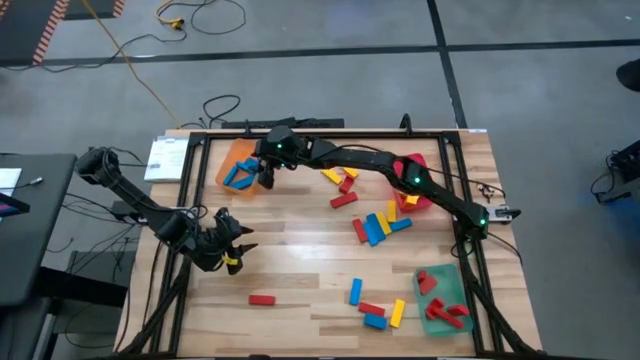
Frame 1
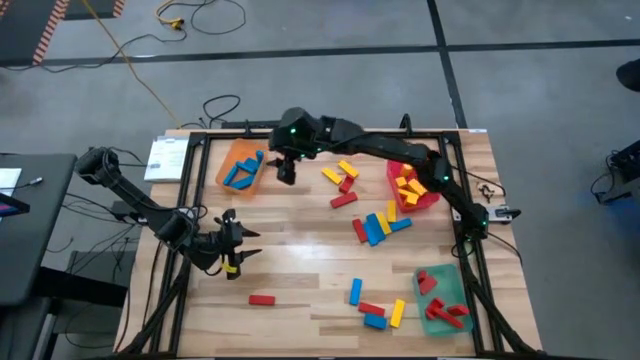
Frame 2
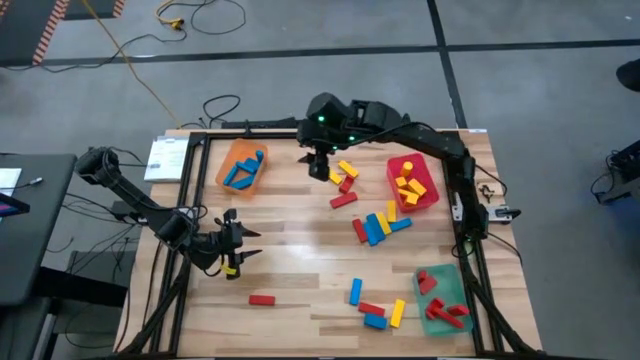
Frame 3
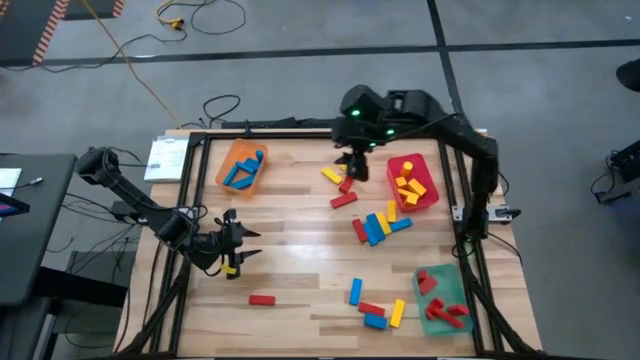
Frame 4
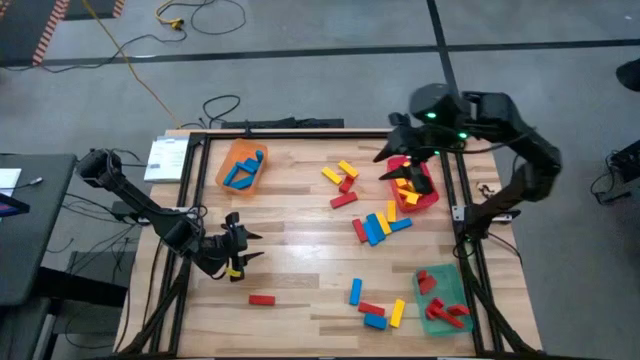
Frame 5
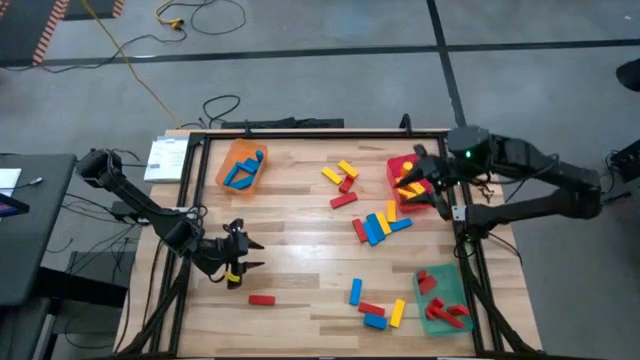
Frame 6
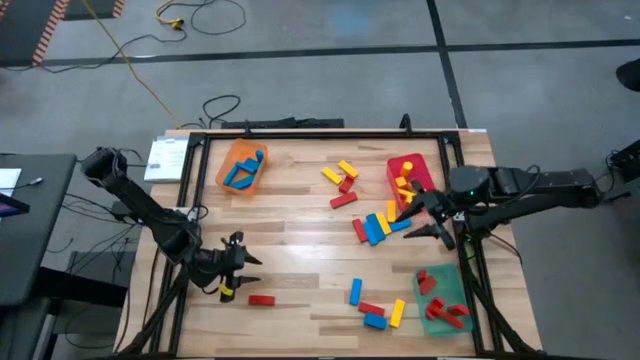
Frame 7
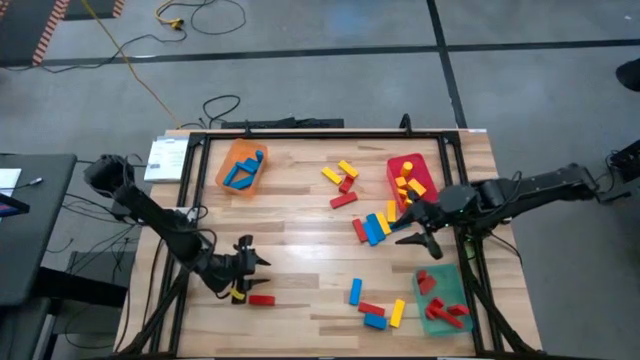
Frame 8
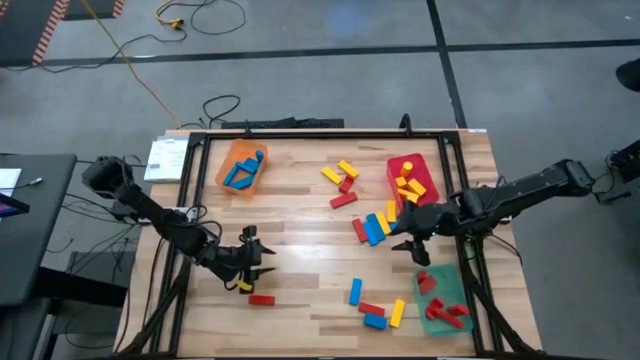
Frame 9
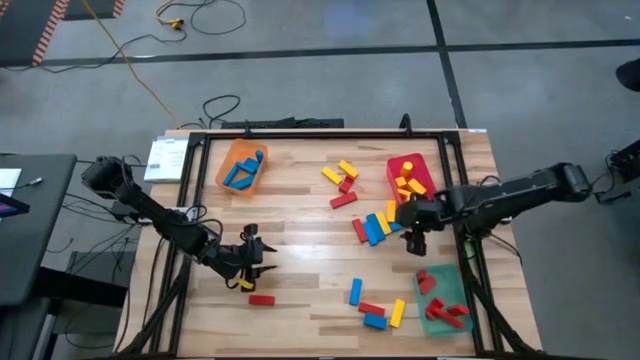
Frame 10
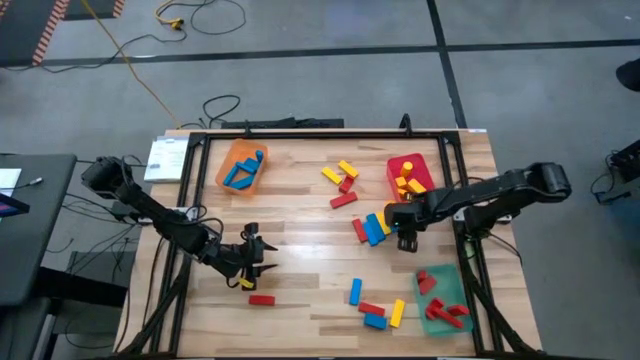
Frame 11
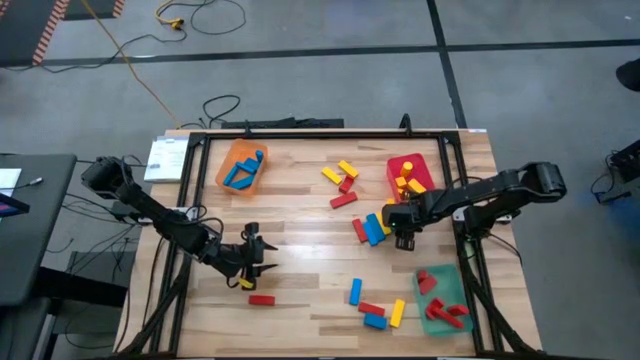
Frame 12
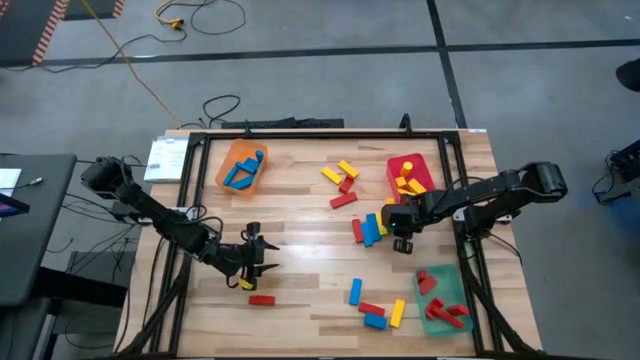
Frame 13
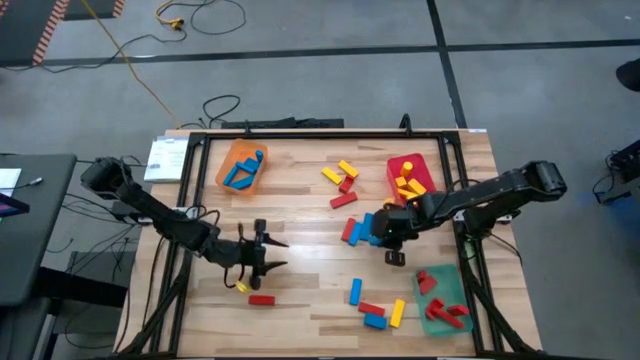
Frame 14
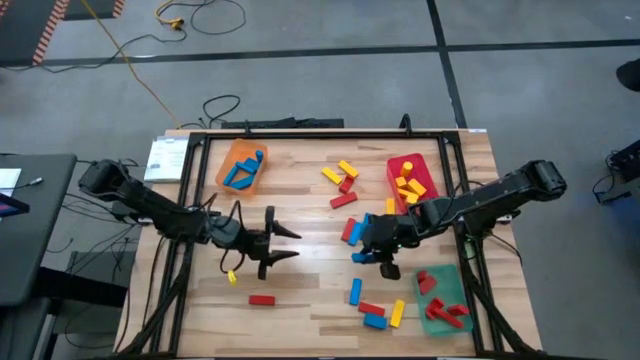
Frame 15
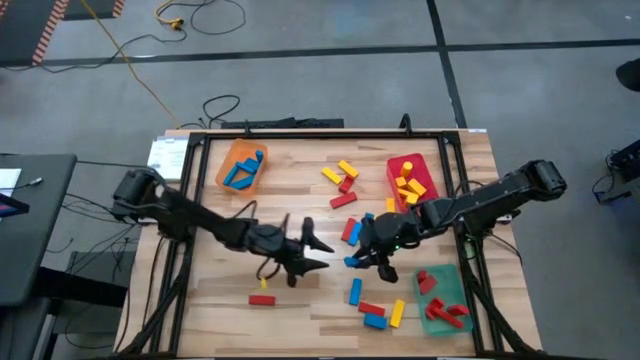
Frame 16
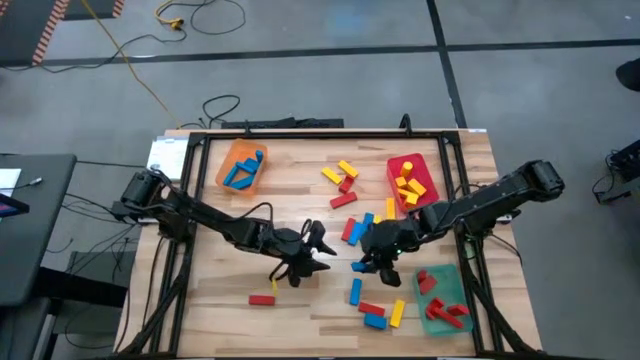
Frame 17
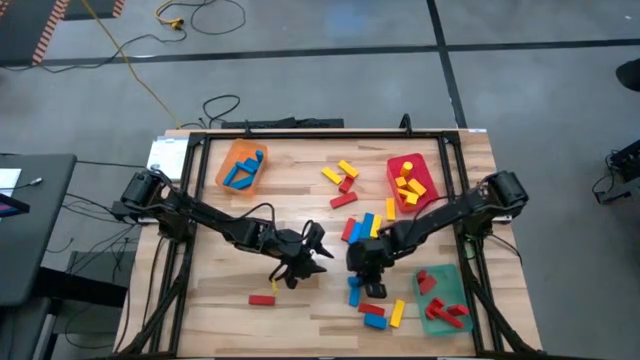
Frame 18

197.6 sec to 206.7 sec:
Task: Sort blocks
Put the blue rectangle block into the orange bin

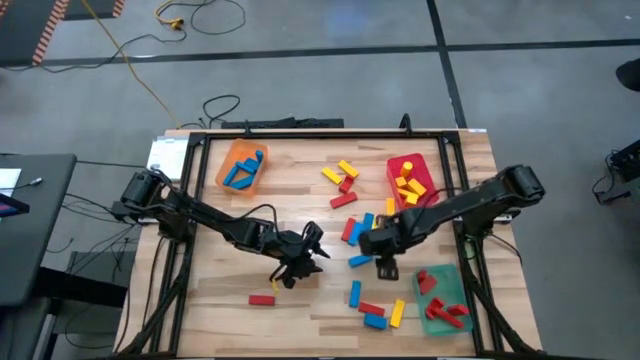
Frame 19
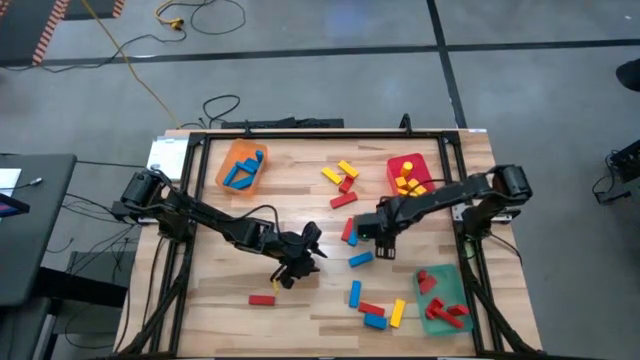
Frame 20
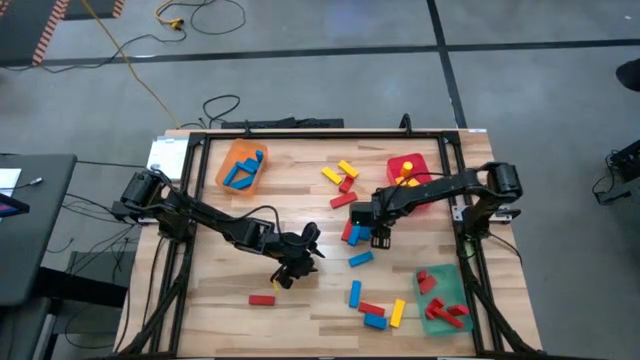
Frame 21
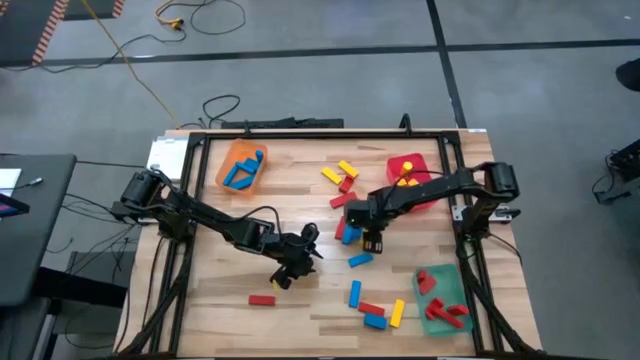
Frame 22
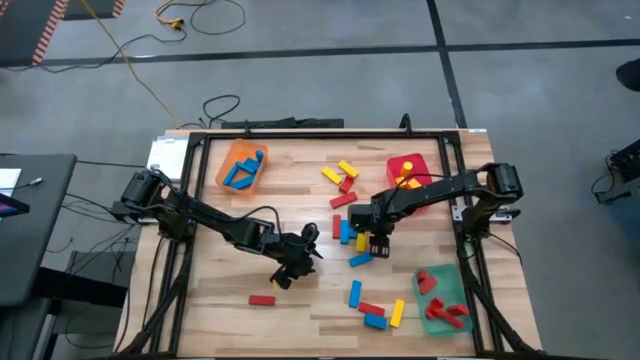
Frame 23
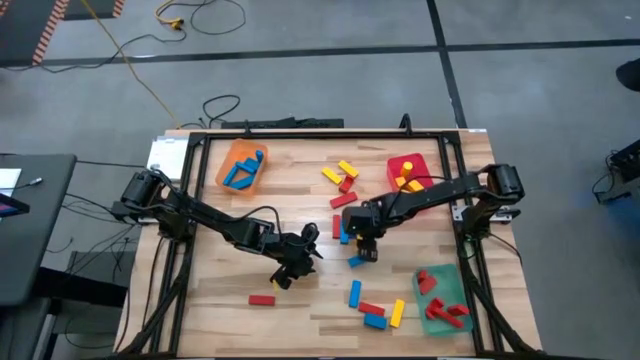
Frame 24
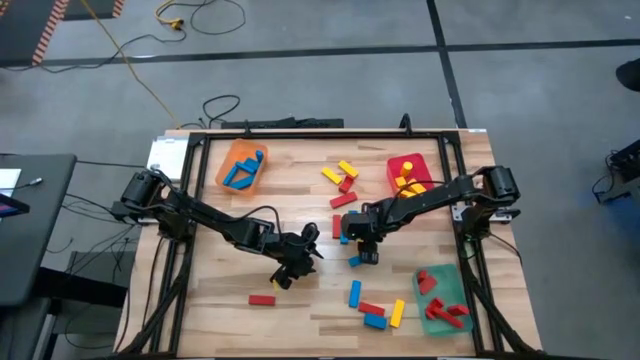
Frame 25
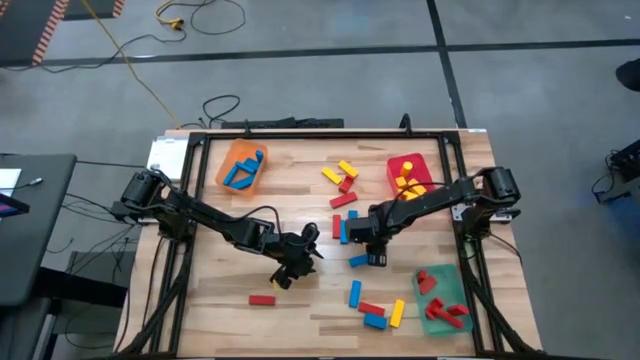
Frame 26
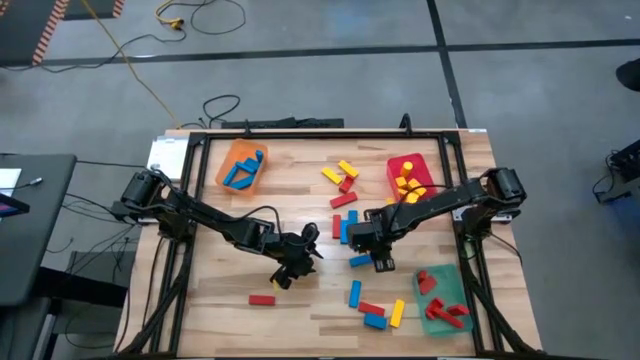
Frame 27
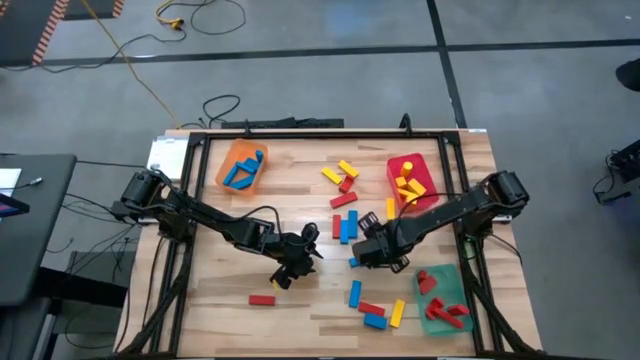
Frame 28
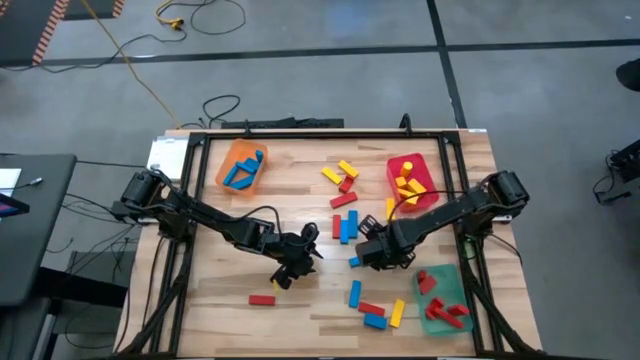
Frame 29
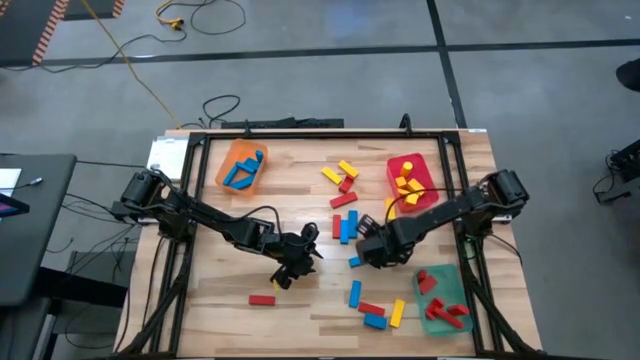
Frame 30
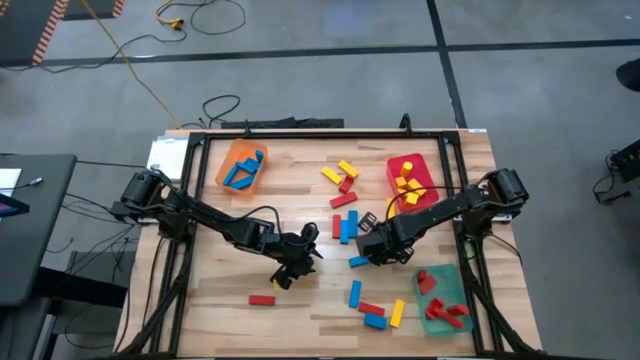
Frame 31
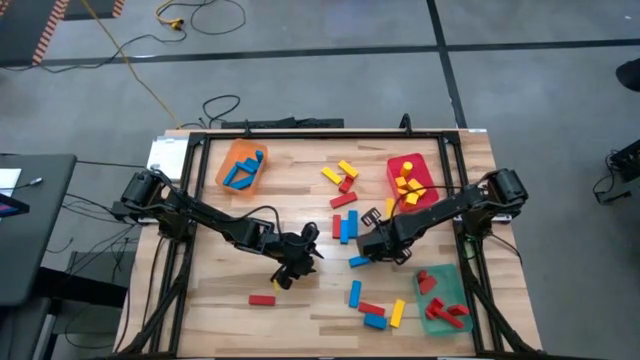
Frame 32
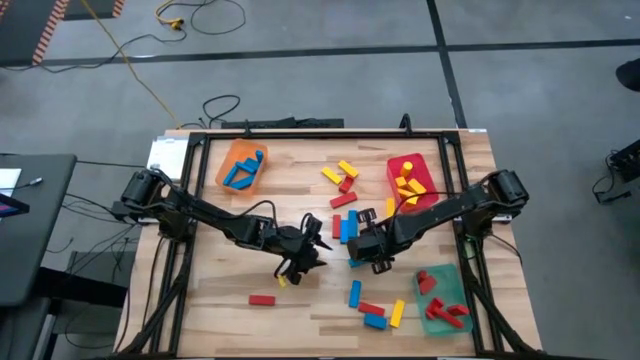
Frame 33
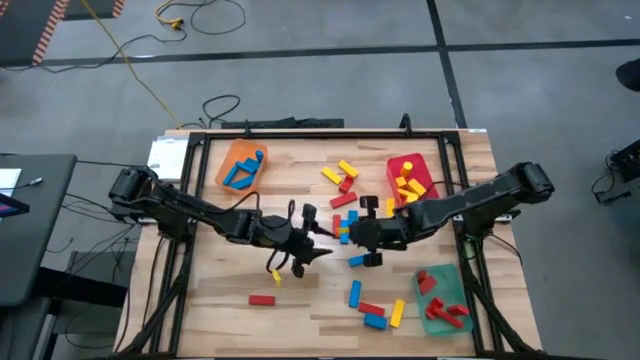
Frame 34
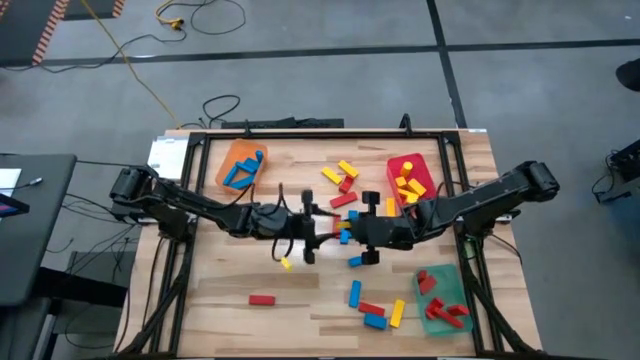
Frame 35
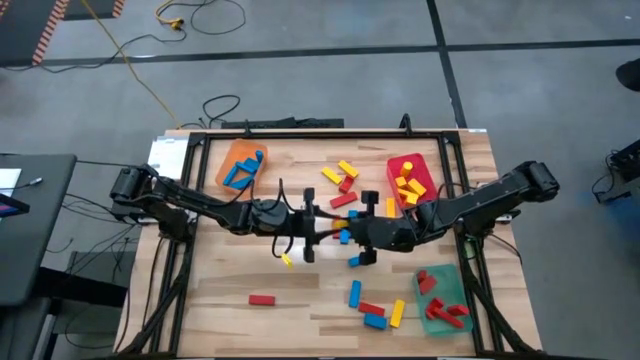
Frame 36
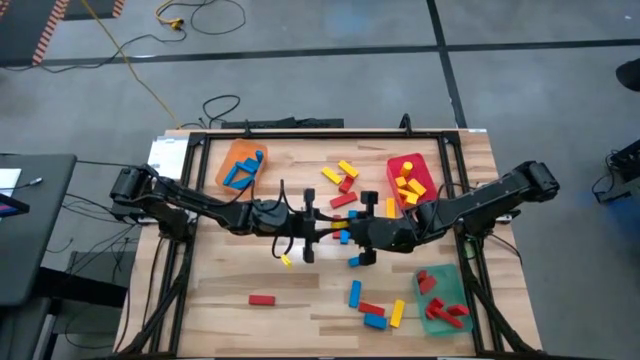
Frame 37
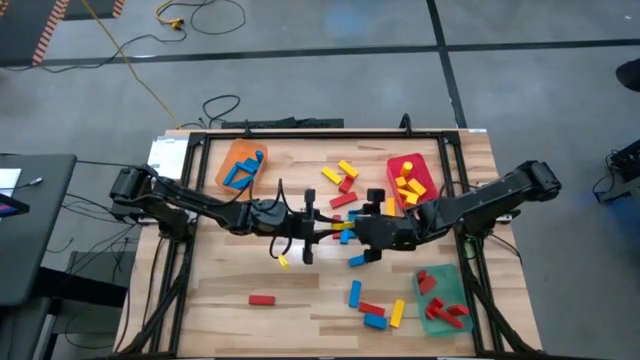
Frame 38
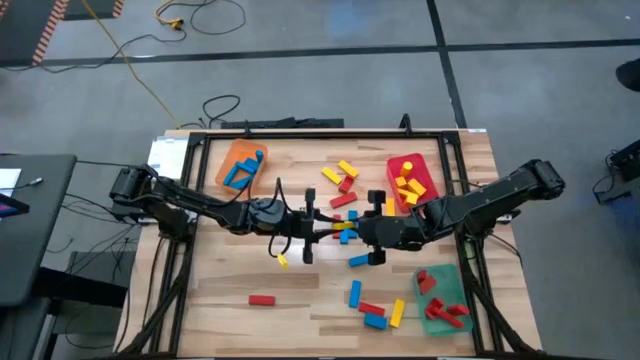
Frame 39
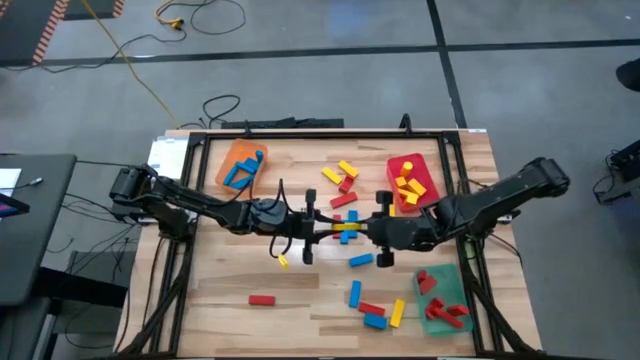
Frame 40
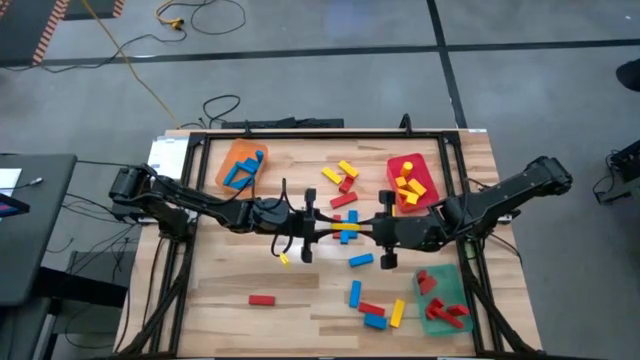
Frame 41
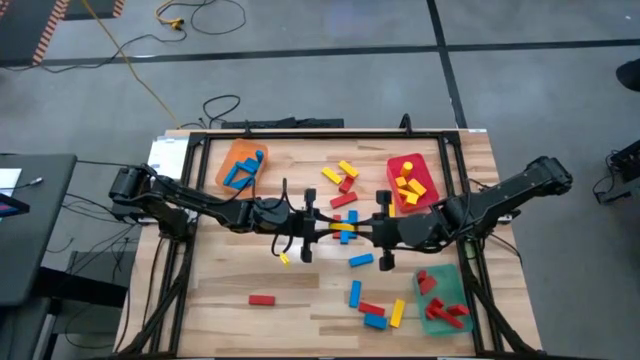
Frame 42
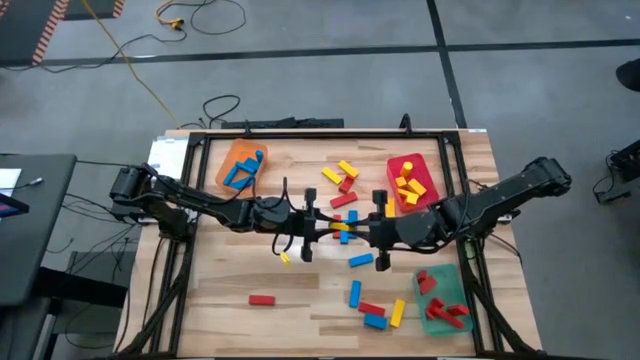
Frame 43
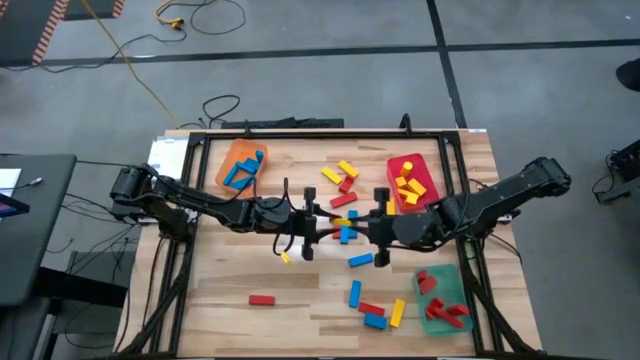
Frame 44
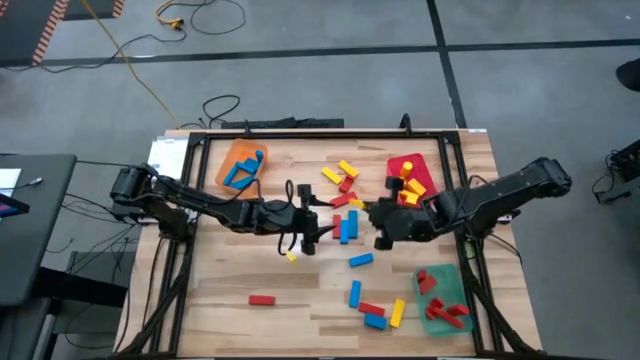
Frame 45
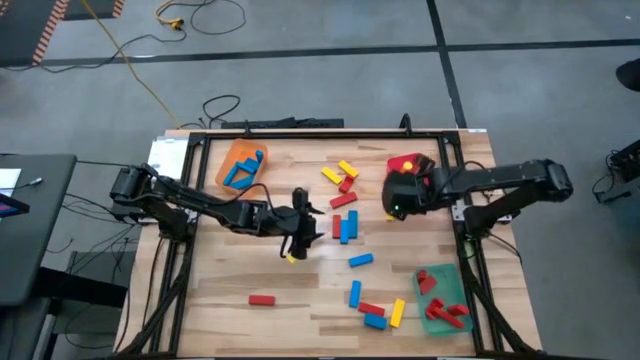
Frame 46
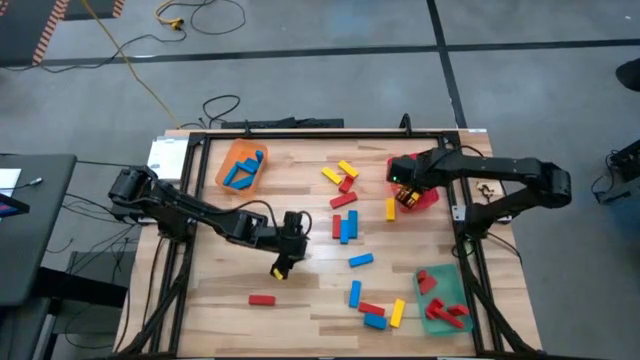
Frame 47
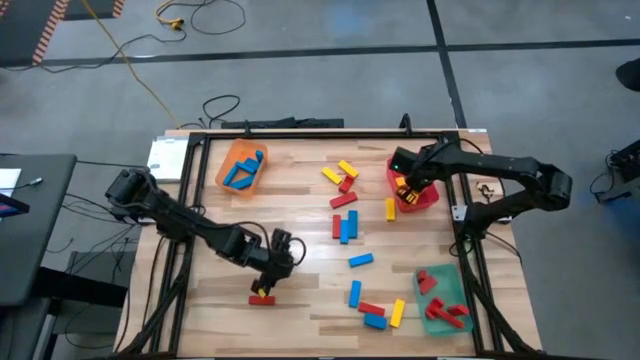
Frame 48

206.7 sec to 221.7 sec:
Put the yellow rectangle block into the red bin
